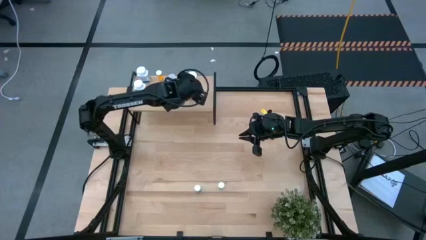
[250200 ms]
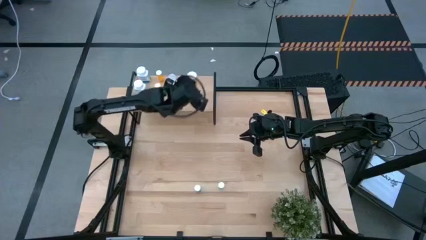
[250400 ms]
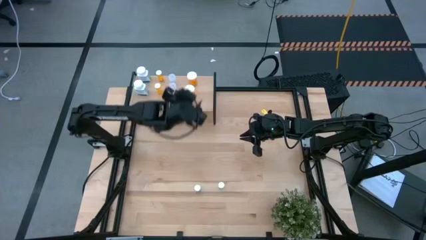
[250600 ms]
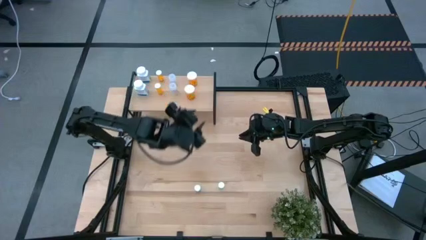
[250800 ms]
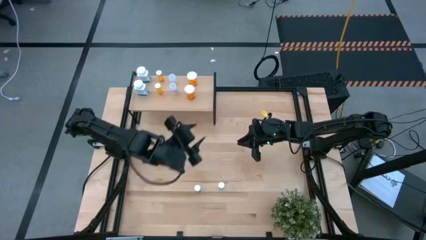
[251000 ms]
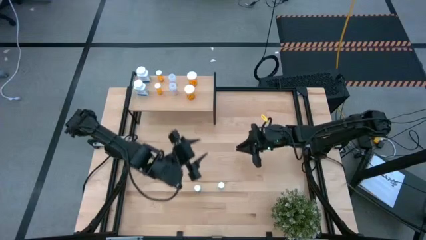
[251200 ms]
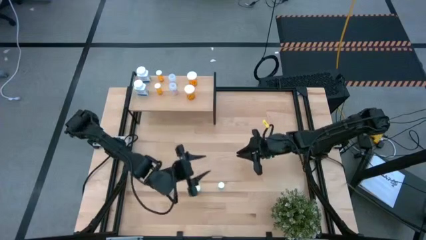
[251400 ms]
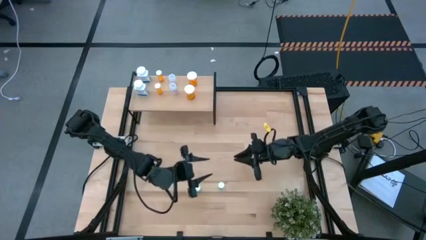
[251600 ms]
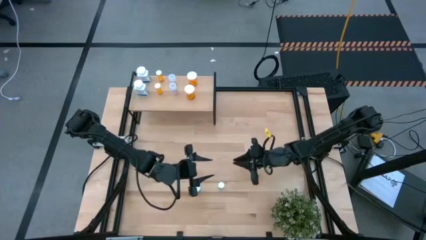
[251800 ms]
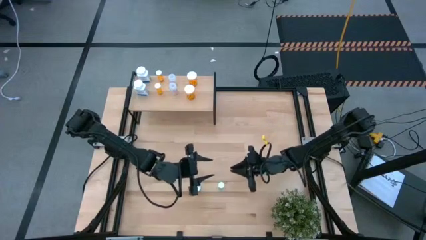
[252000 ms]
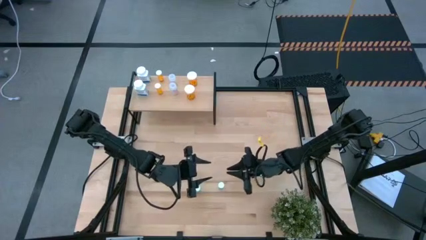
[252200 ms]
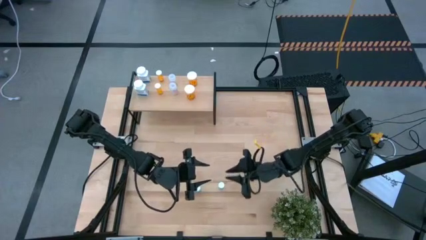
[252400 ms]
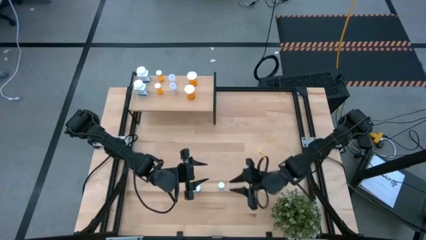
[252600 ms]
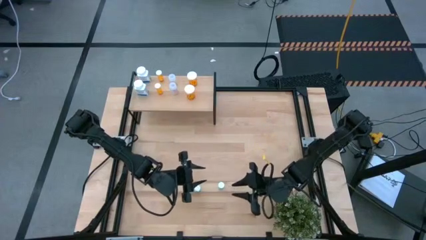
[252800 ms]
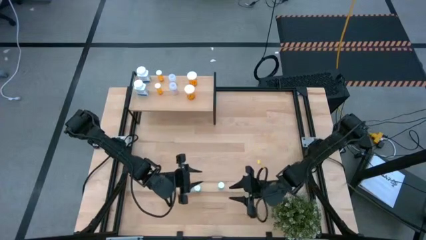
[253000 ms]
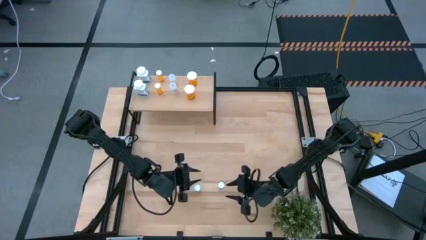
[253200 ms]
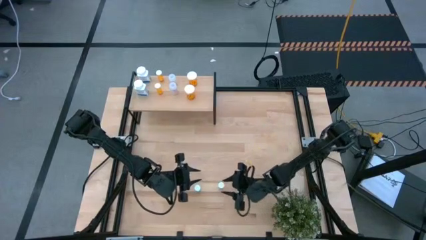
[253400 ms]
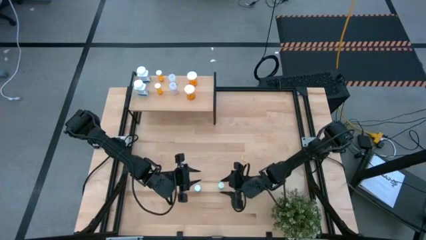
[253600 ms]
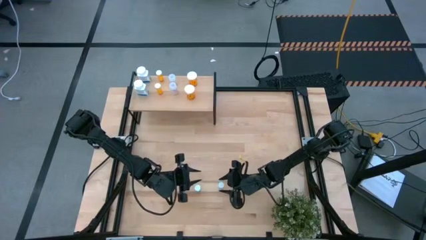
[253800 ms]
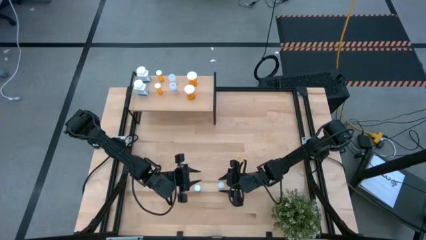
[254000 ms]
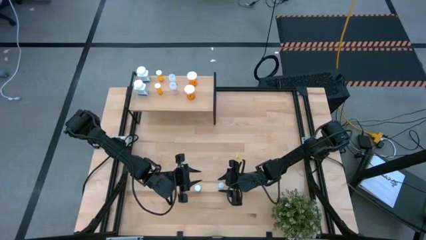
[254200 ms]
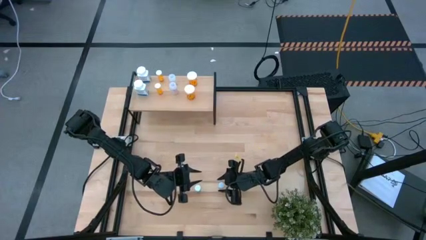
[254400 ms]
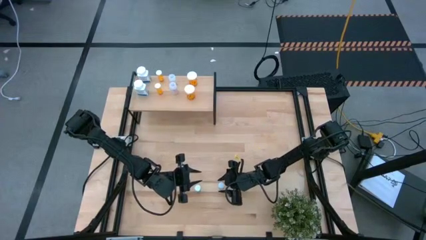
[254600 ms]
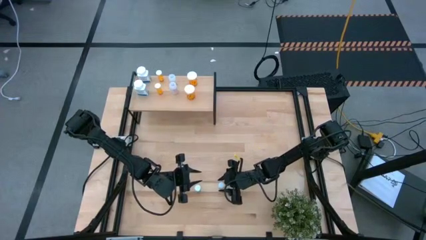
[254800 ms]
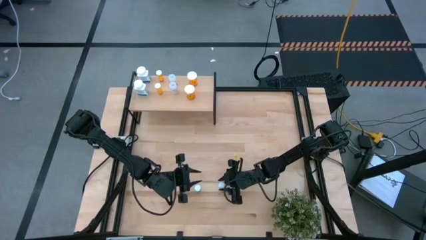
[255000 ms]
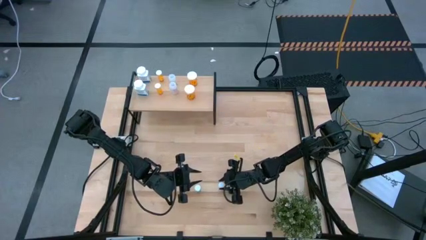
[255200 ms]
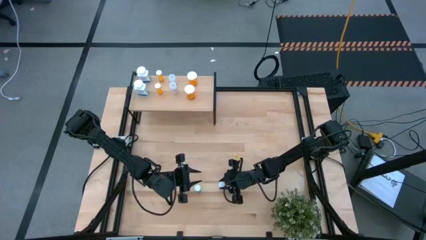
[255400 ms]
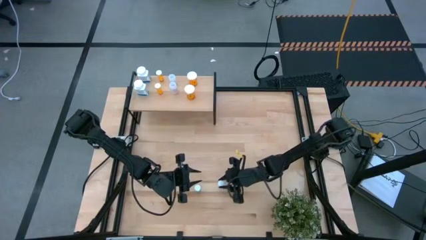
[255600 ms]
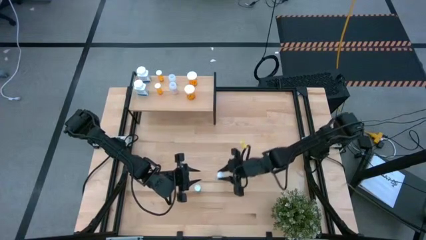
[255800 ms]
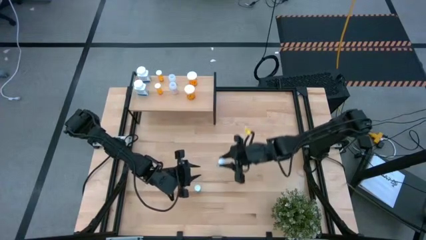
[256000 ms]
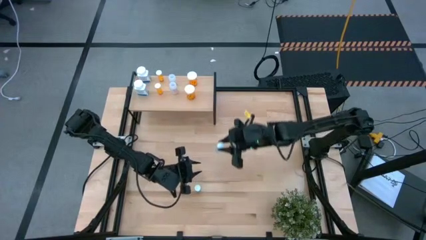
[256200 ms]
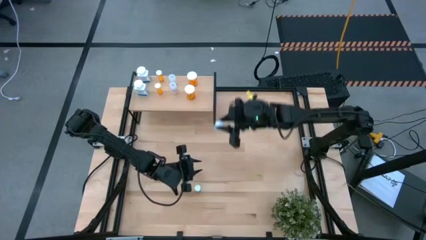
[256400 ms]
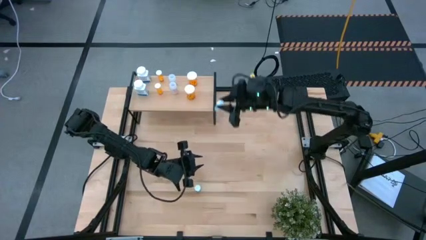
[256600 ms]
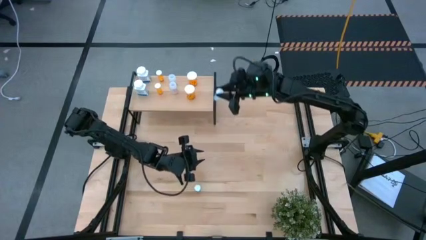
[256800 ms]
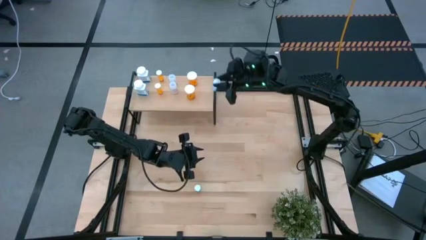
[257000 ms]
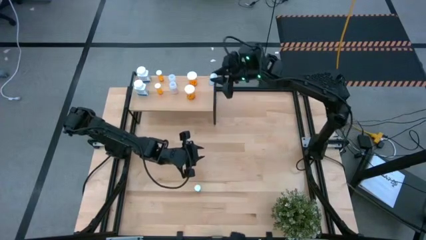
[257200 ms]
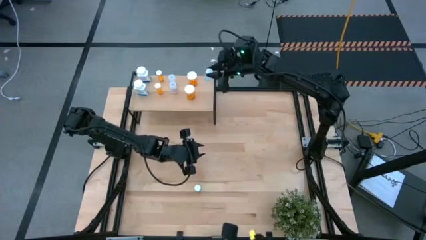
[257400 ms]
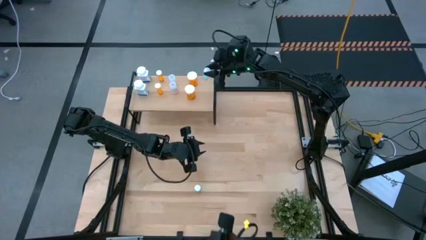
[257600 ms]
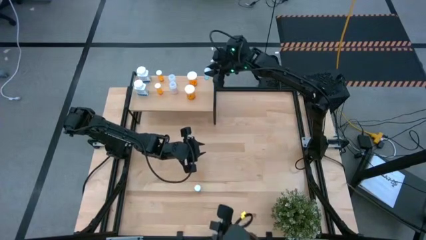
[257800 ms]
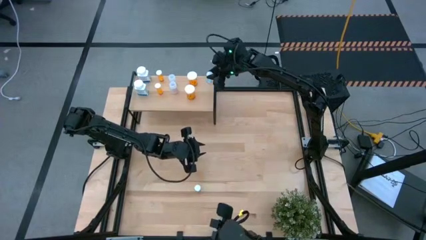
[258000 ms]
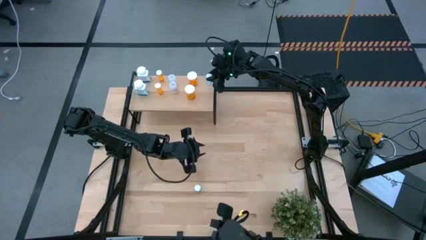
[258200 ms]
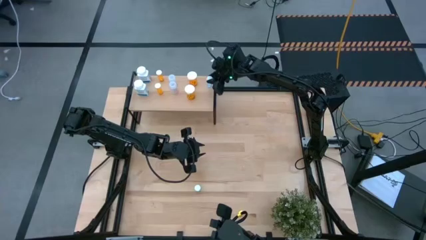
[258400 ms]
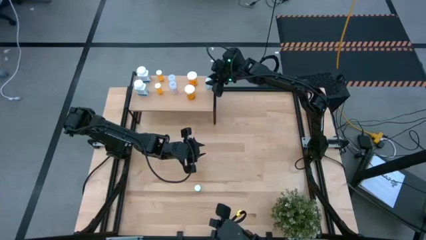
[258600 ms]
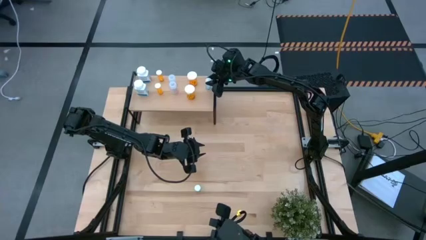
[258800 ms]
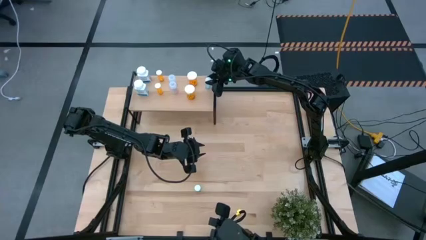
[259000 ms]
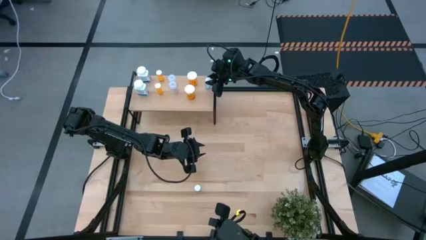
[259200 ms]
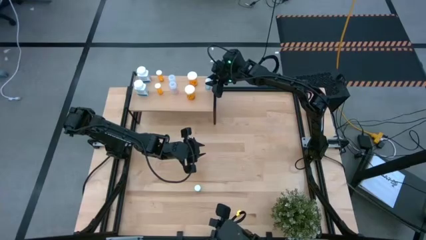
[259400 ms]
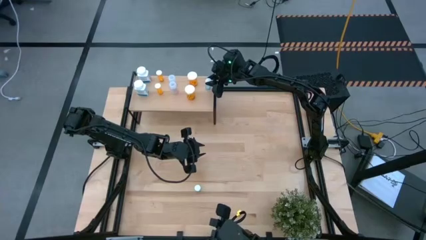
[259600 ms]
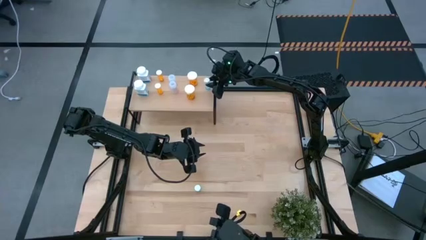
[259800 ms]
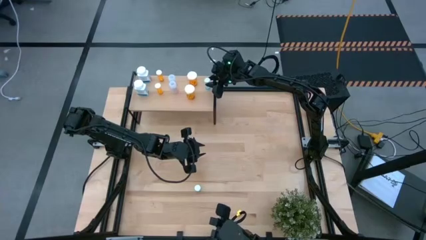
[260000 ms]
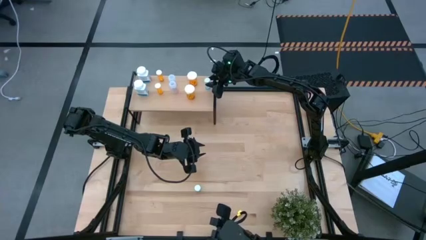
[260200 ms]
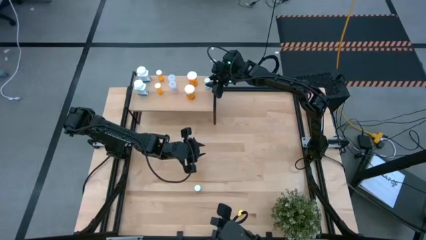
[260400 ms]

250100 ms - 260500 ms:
Task: Pick and place medicine bottles onto shelf by color
Put the right blue pill bottle on the shelf

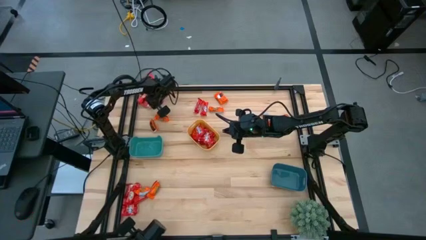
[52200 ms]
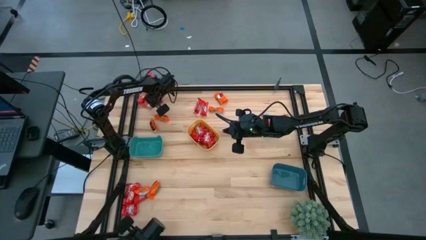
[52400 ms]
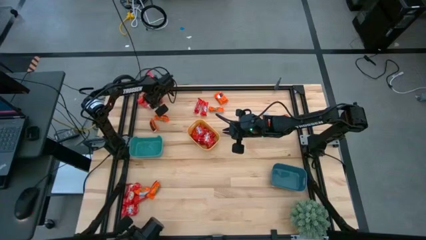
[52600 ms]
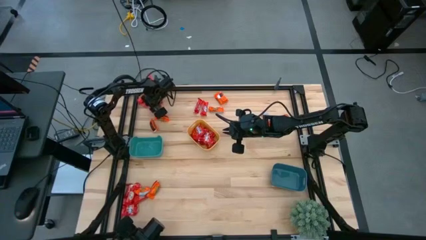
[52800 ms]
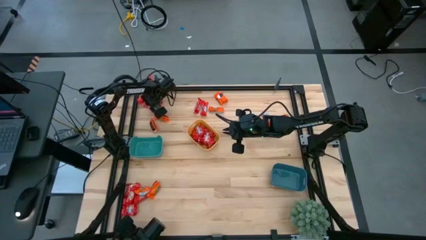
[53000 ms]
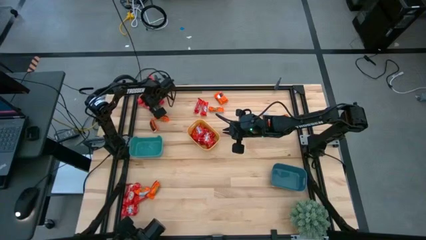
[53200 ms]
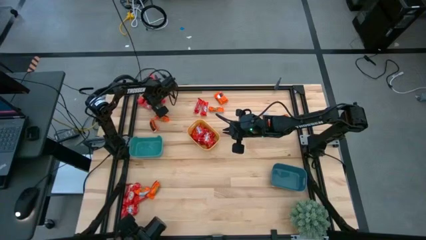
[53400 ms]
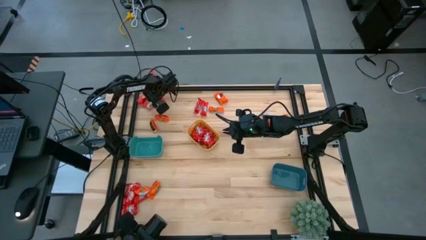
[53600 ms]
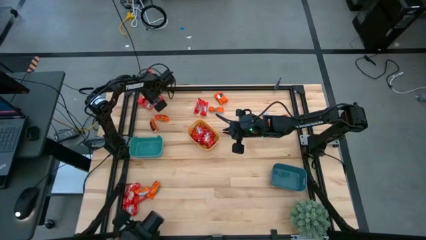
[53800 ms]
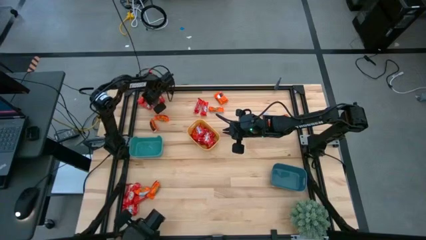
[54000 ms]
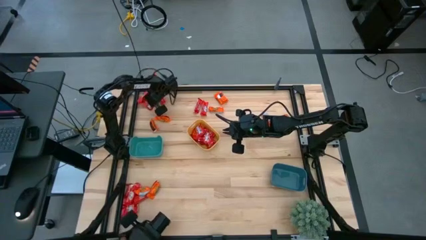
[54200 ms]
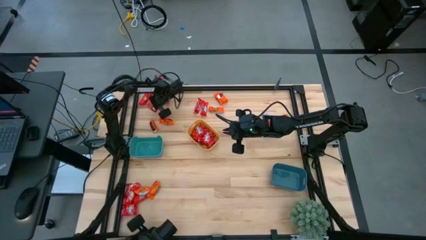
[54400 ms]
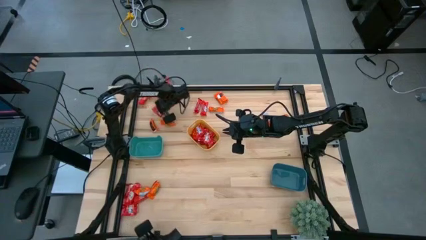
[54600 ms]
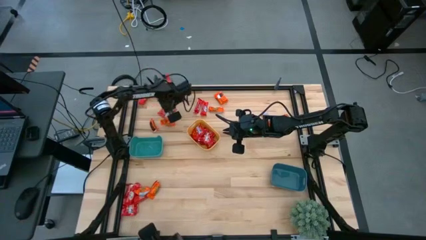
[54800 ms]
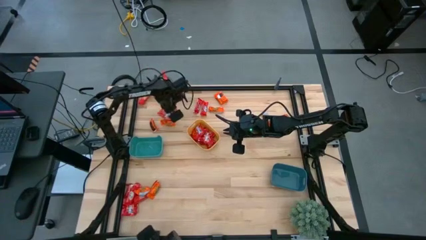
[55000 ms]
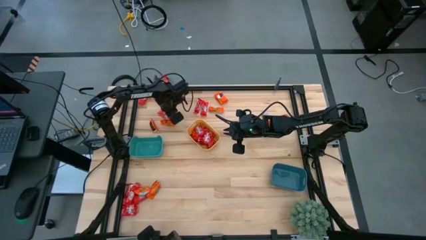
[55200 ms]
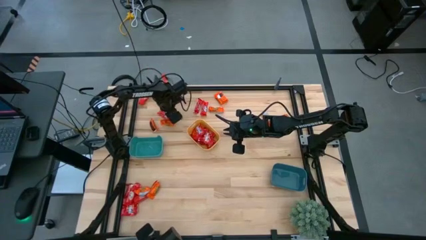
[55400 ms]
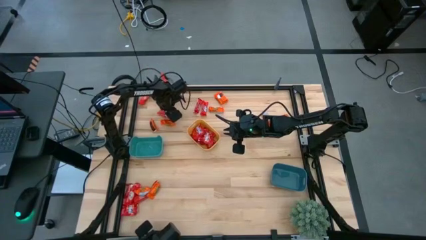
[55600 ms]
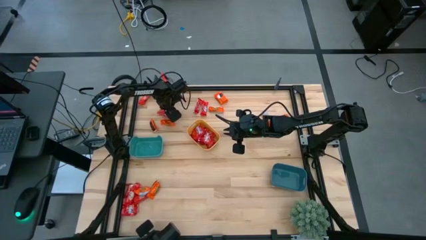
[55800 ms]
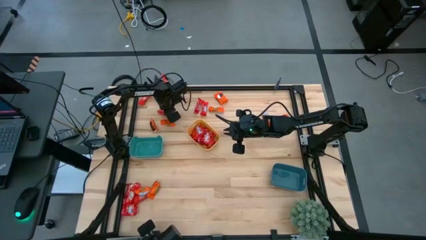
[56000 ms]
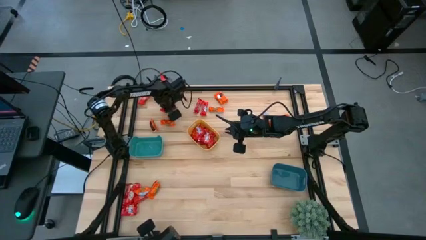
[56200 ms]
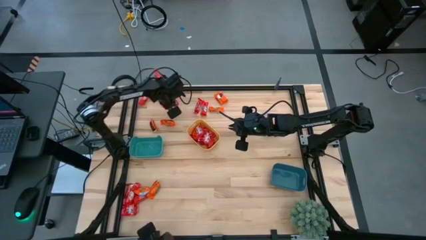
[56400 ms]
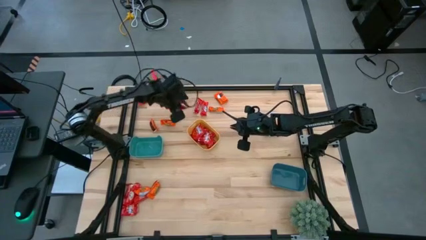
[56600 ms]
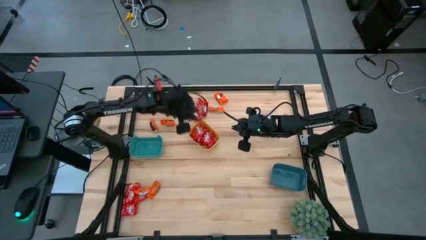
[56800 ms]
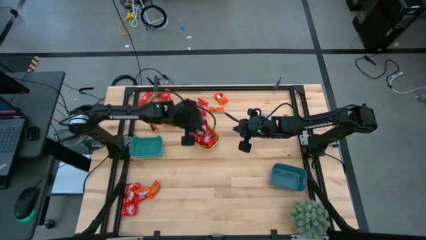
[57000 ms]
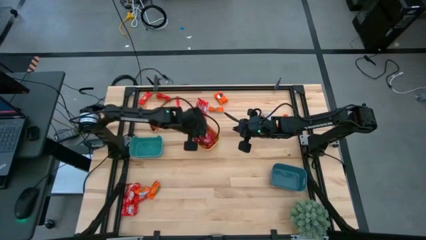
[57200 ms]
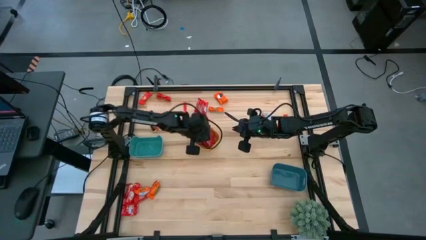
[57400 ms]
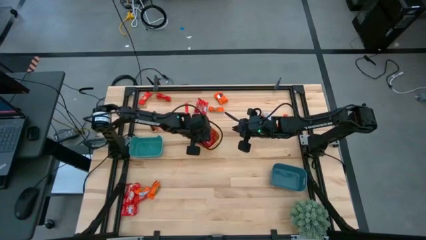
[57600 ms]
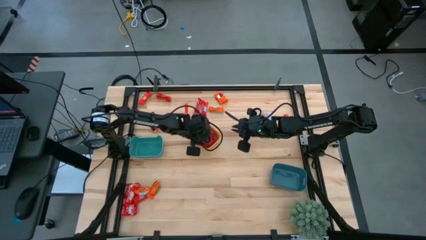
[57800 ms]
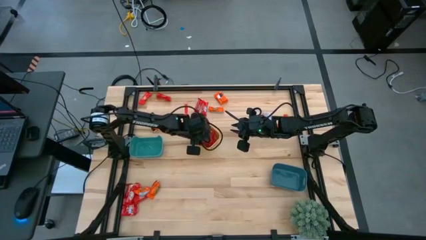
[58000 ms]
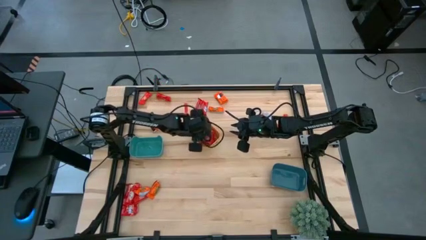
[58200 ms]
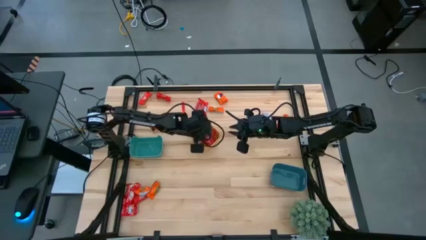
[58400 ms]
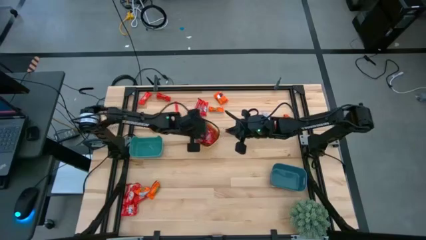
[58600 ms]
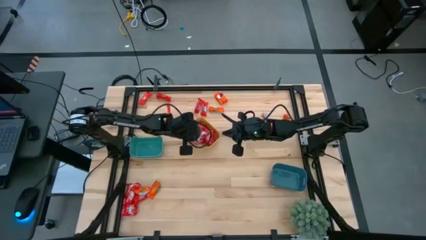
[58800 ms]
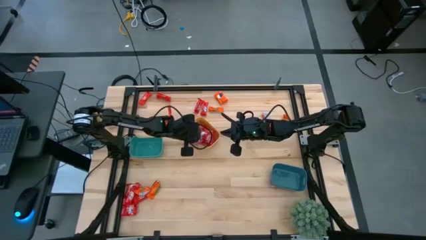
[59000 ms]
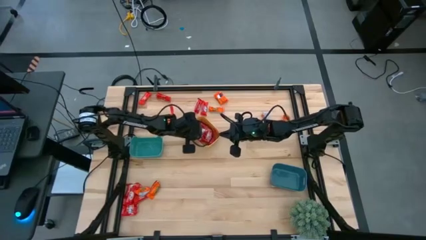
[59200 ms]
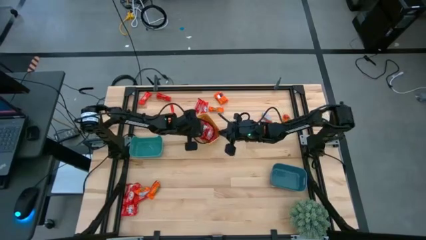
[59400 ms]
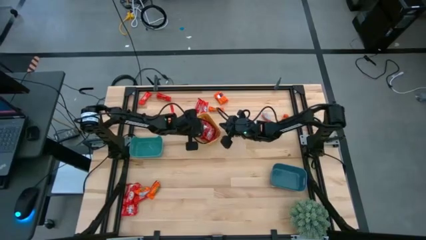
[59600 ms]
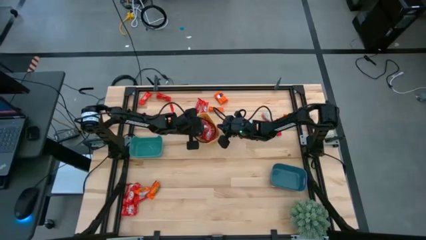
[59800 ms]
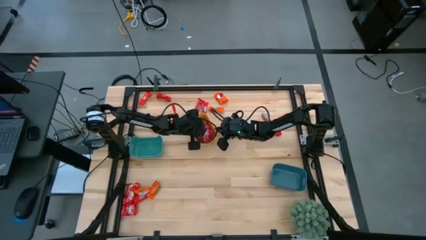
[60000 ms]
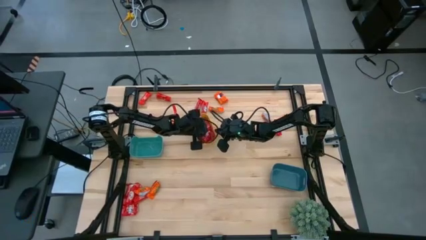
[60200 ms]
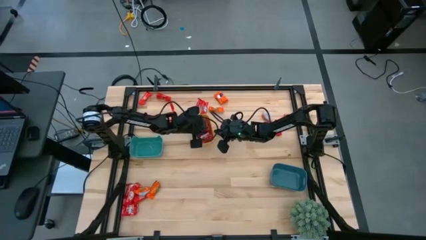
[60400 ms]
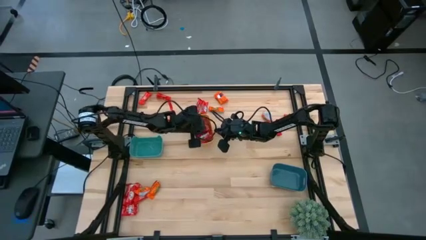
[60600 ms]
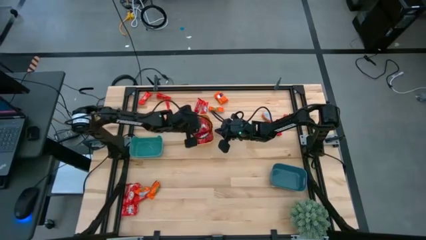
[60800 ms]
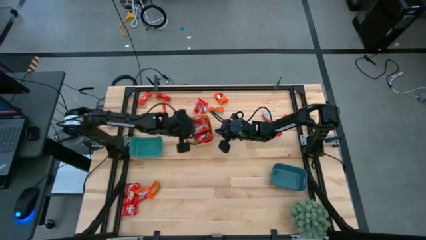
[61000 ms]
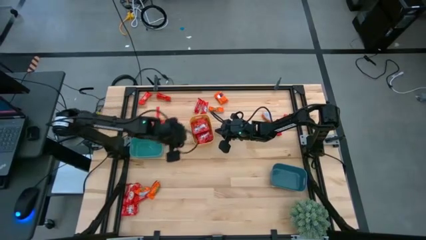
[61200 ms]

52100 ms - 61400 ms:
Task: Sort candy
Put the red candy into the yellow bin
